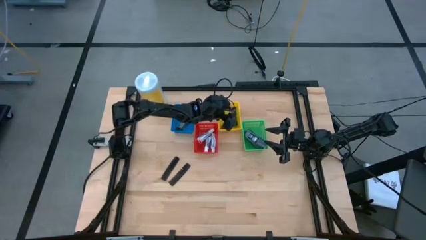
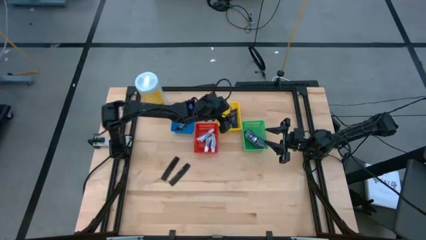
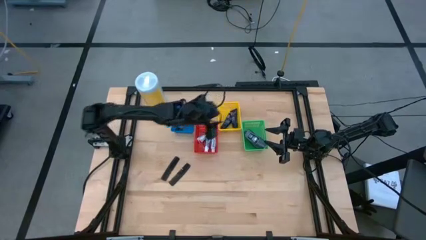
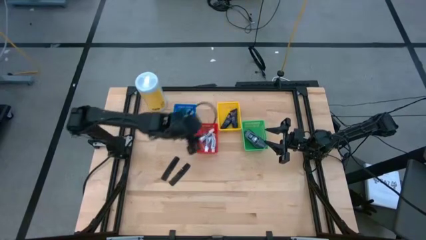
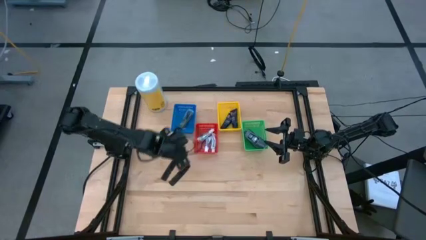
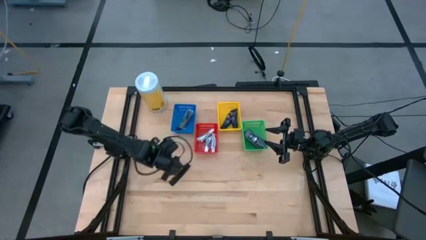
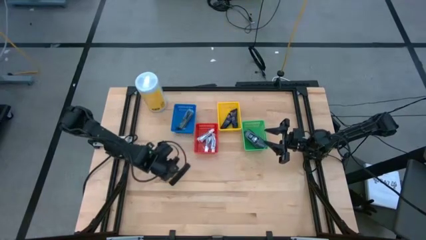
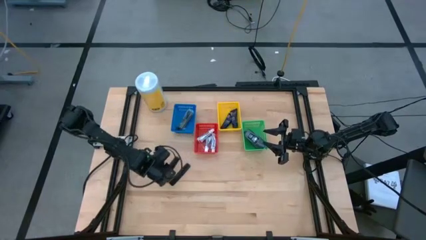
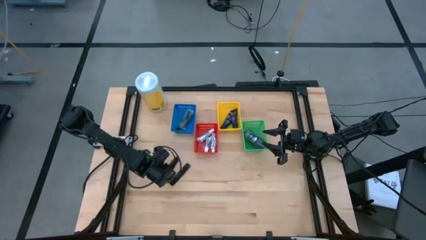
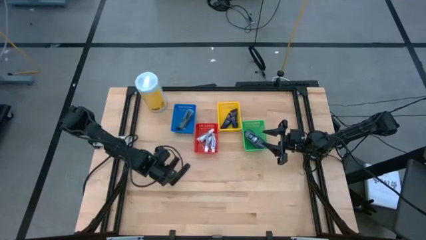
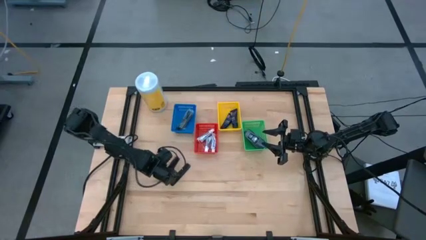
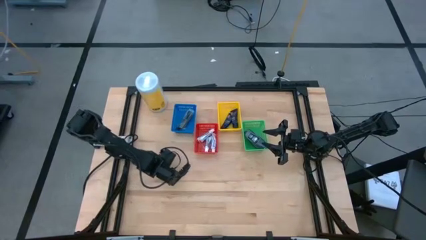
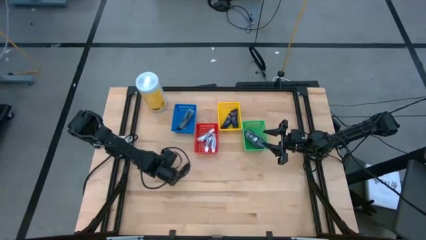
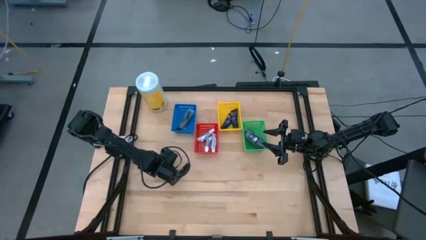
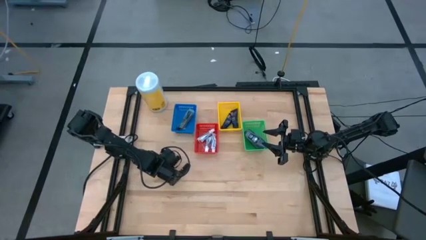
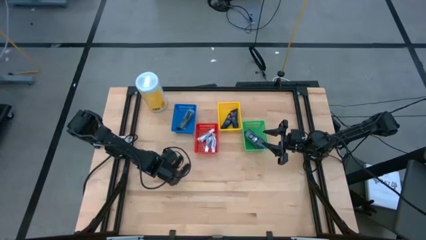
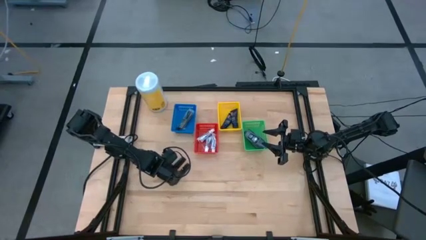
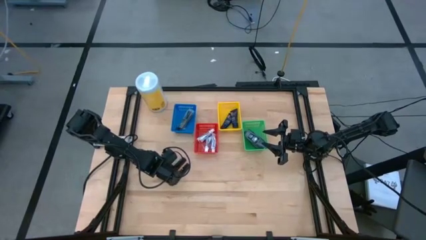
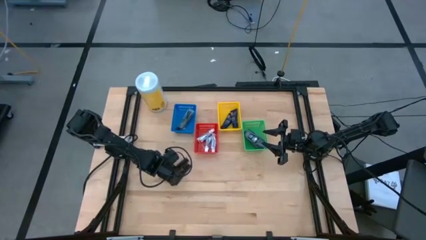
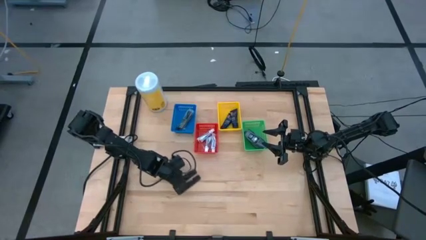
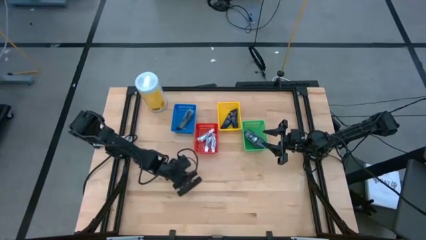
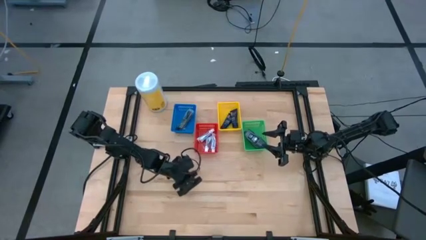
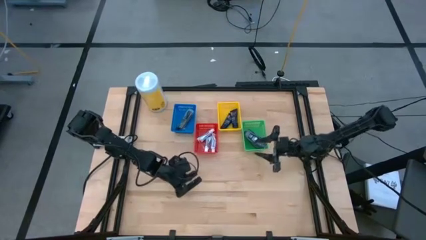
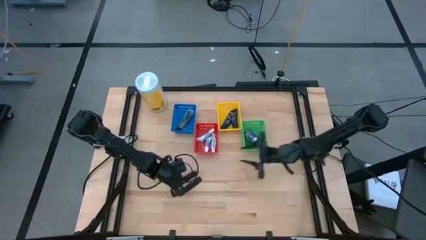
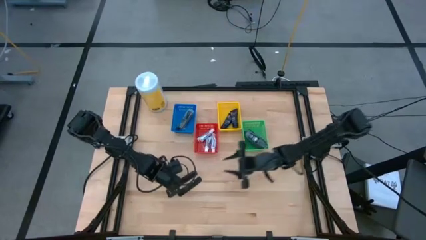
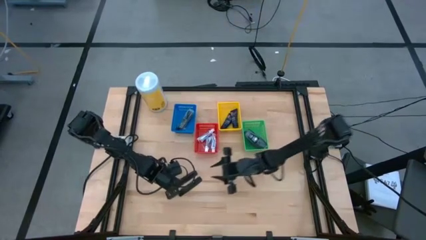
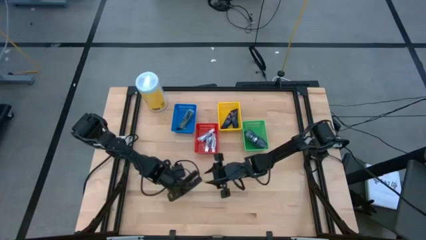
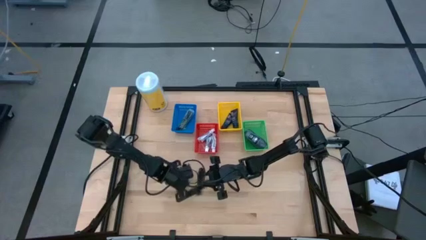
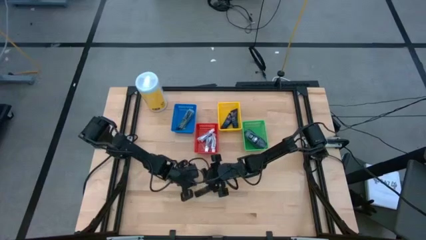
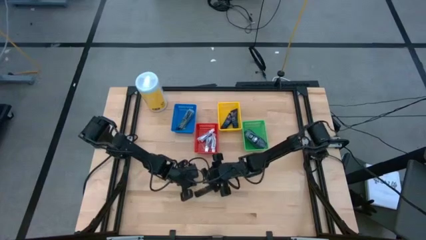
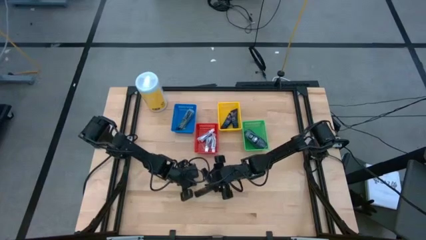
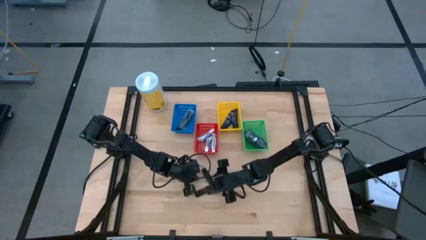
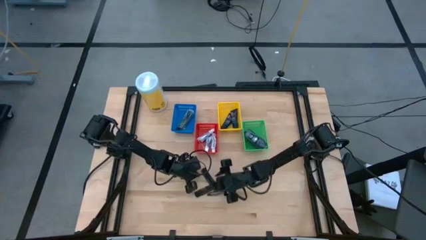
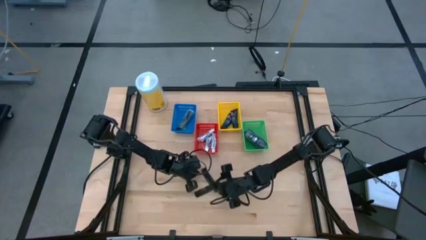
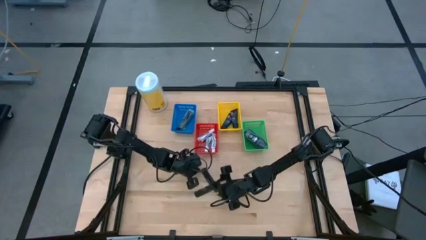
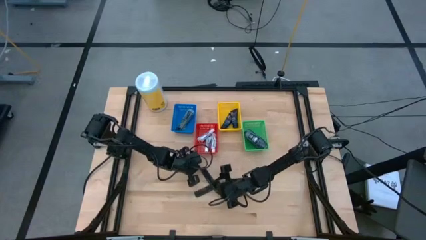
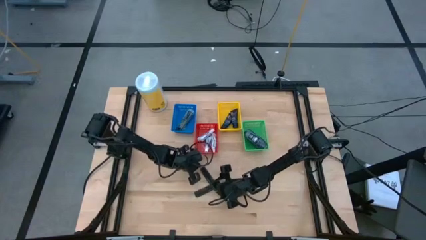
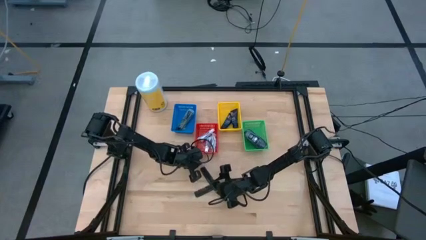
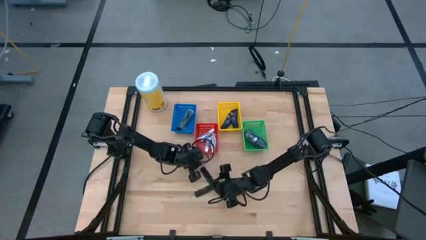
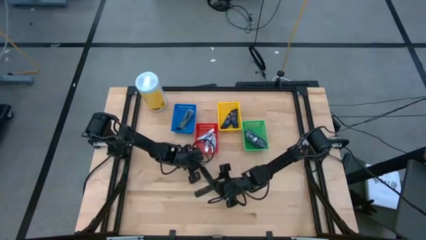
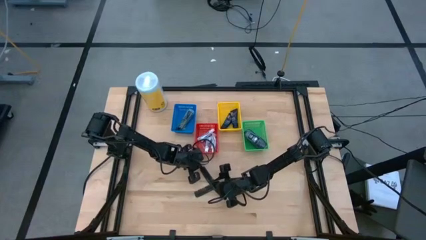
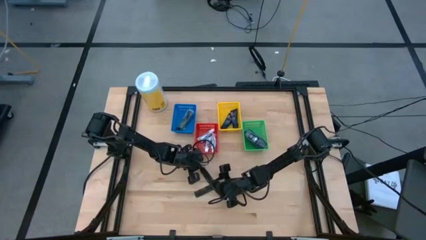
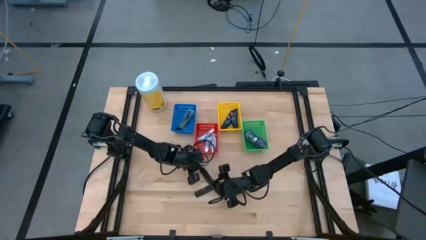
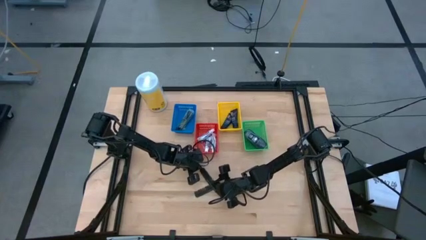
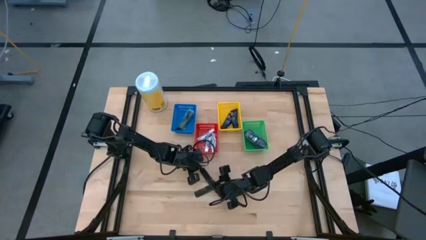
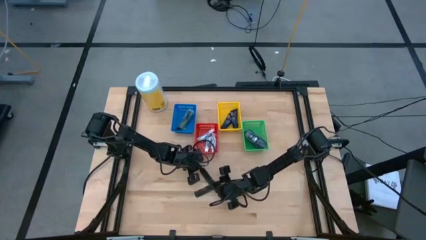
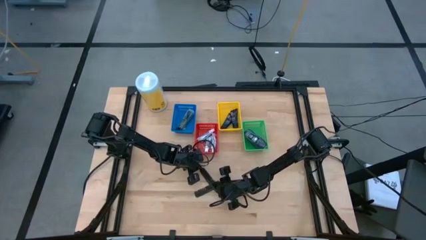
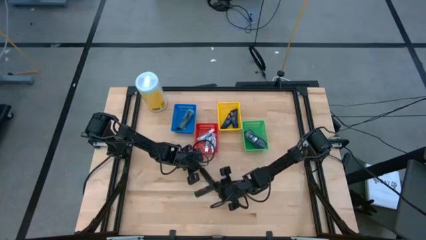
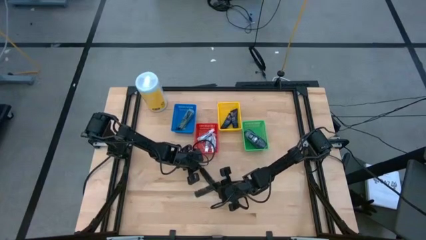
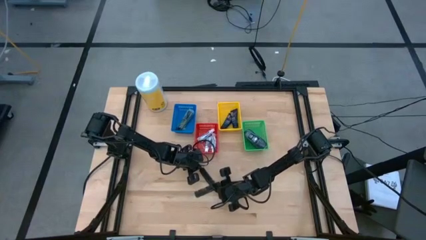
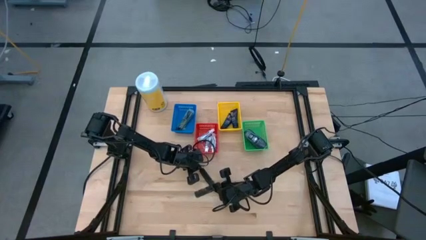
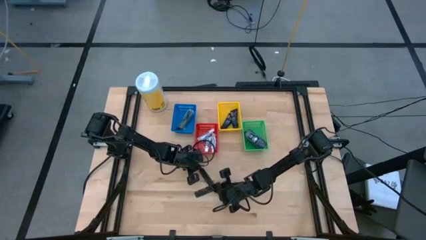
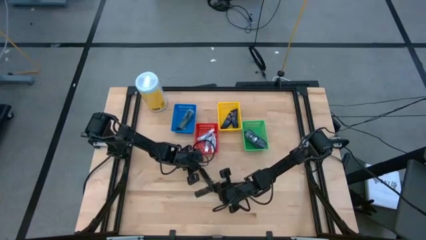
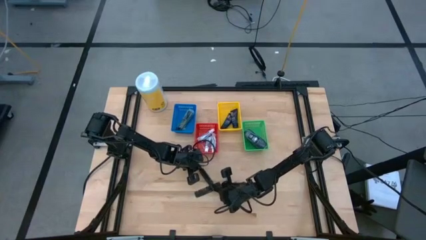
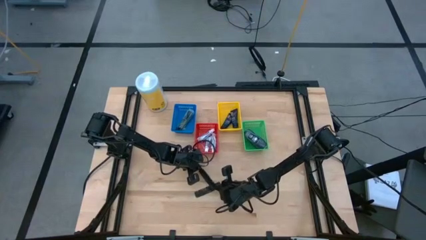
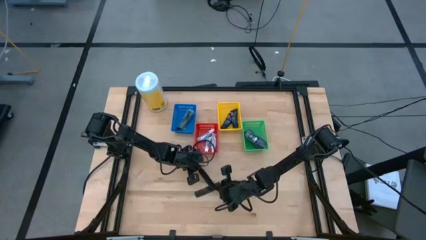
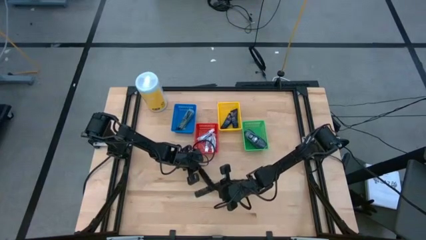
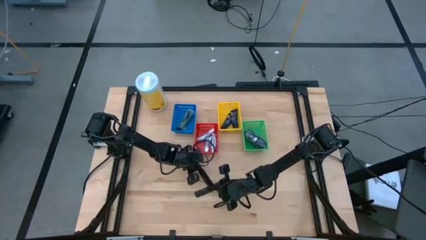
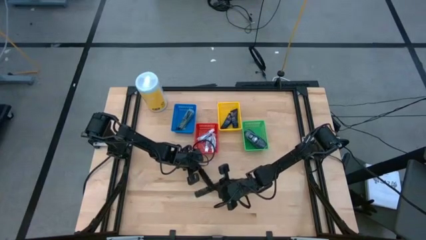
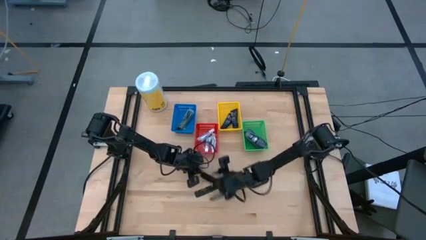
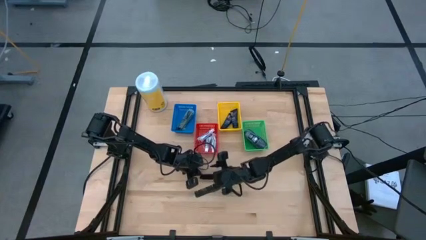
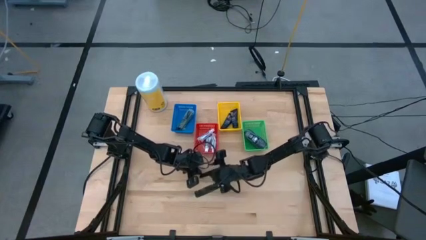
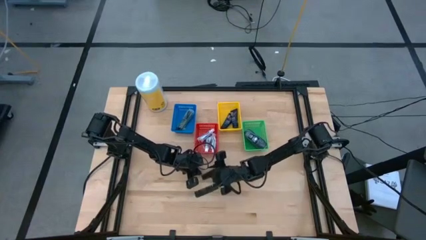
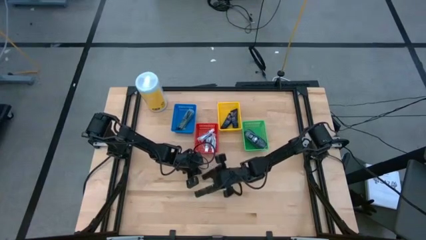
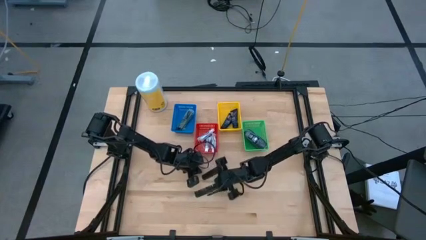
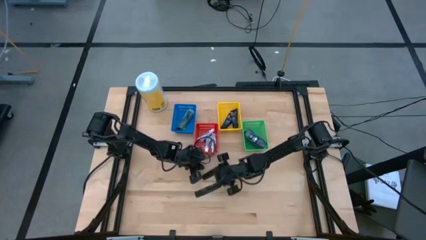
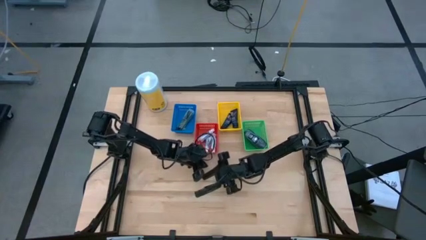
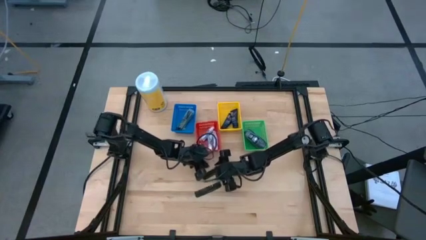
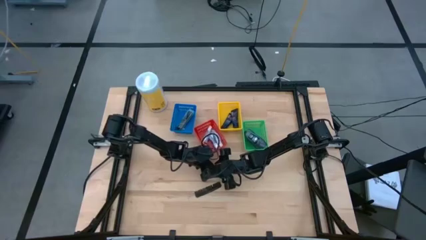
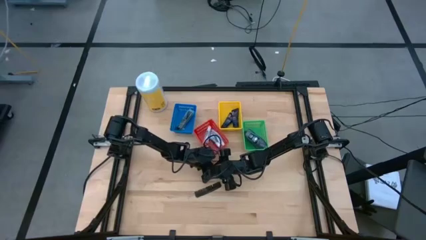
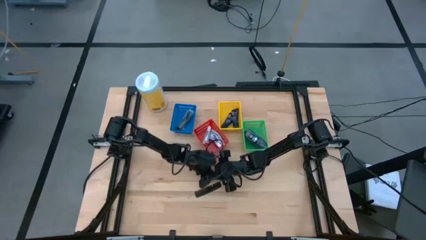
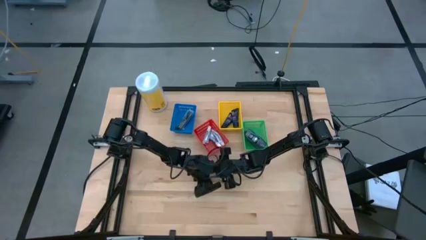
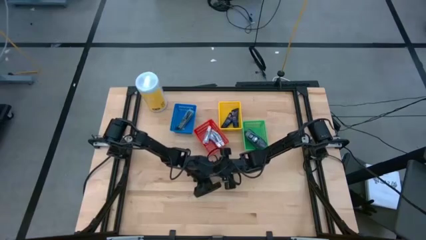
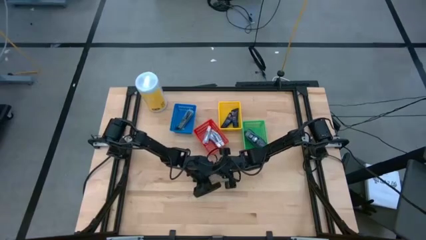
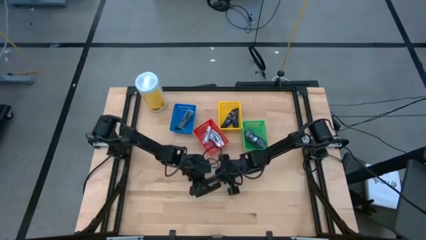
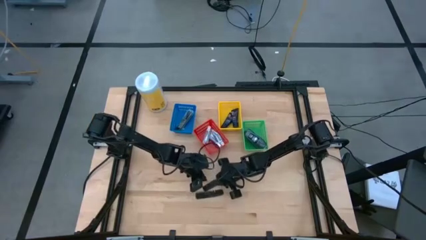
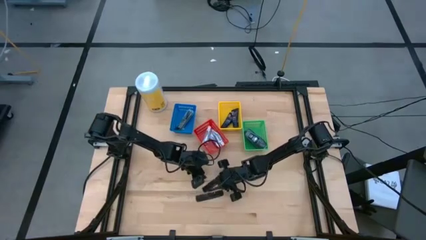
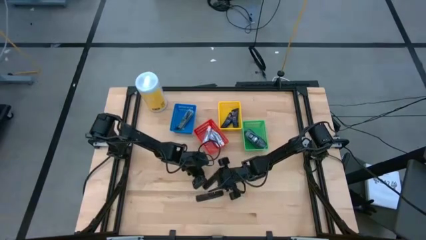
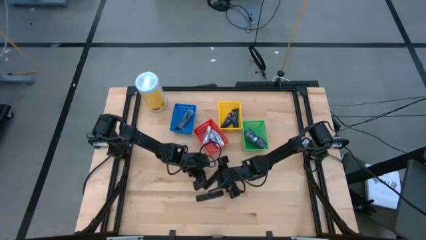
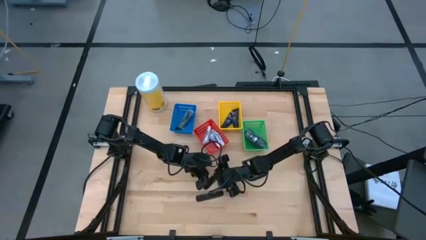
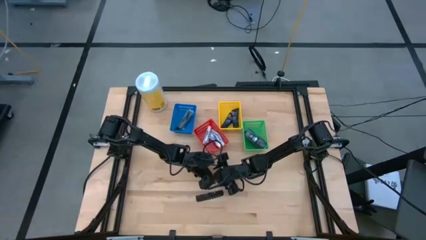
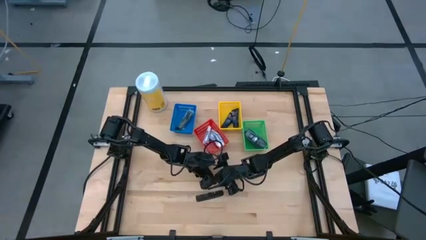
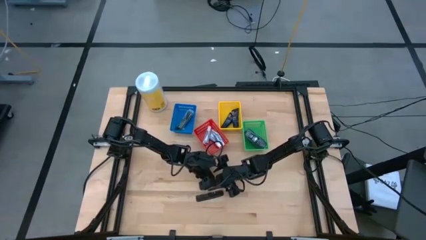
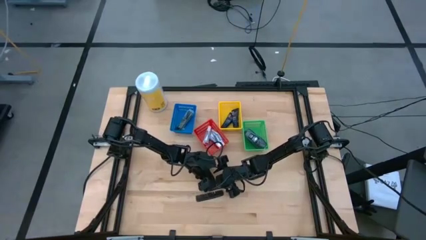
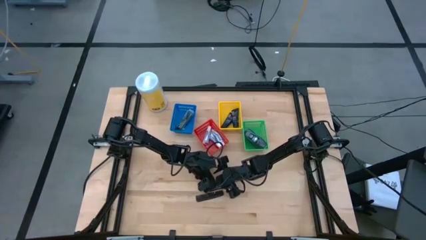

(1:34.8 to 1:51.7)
Task: Pick & Place Travel size toiletries
Put the black comb into the blue bin
